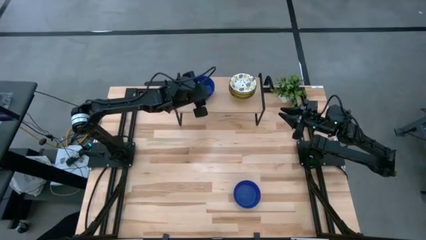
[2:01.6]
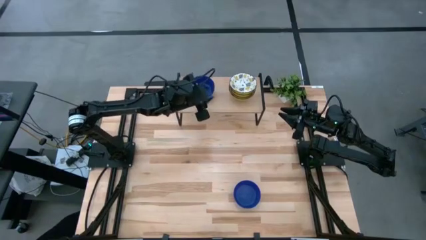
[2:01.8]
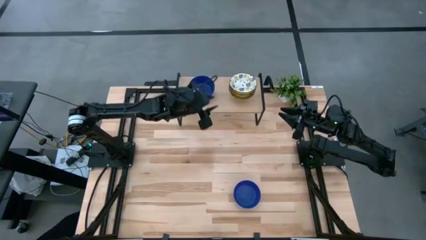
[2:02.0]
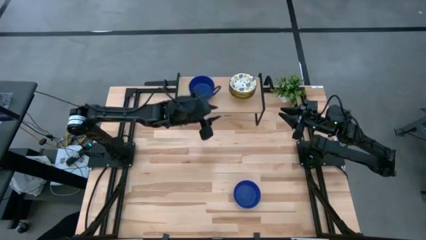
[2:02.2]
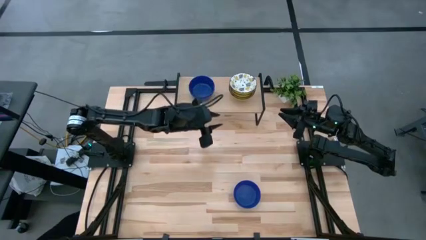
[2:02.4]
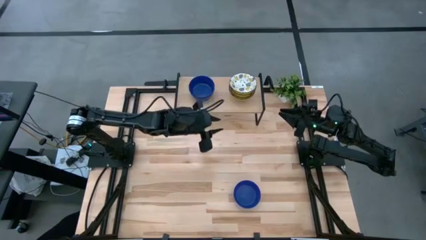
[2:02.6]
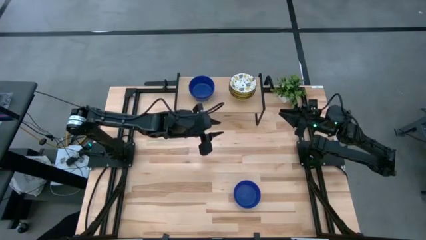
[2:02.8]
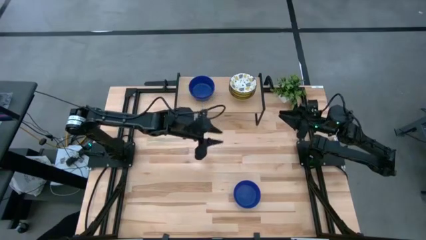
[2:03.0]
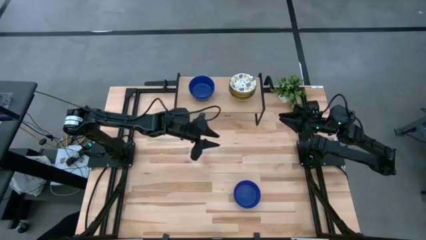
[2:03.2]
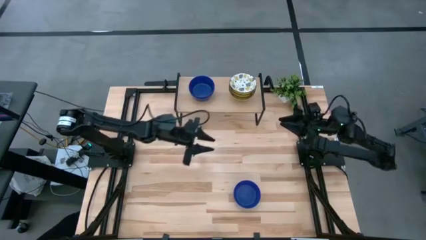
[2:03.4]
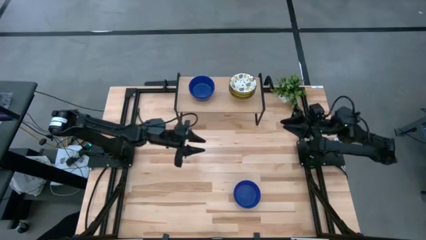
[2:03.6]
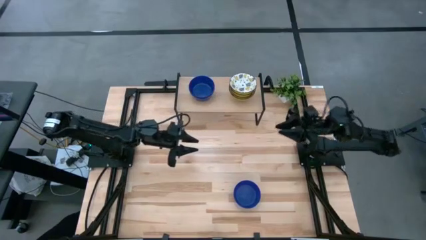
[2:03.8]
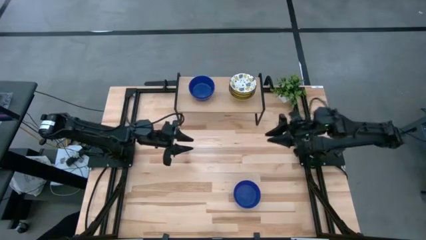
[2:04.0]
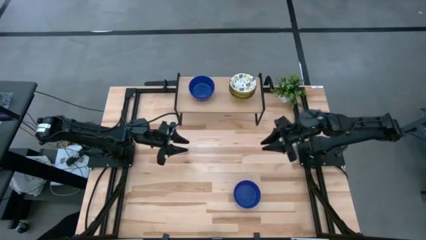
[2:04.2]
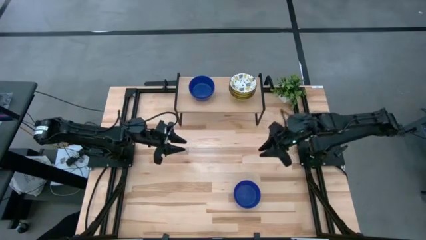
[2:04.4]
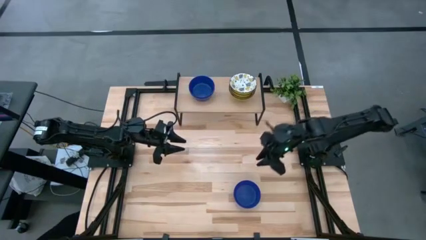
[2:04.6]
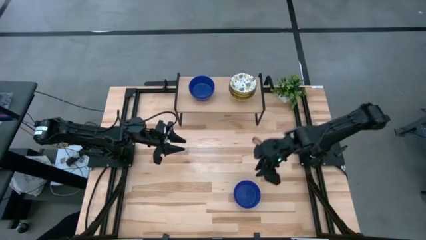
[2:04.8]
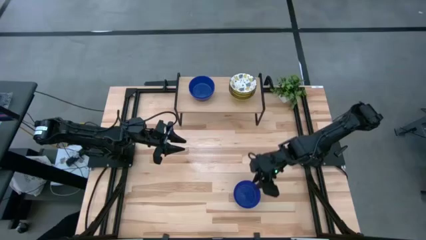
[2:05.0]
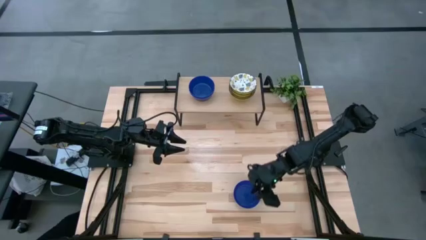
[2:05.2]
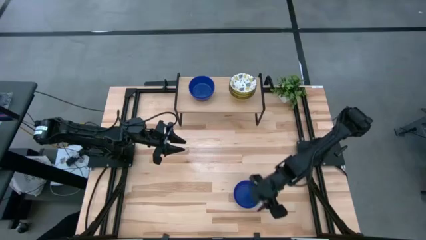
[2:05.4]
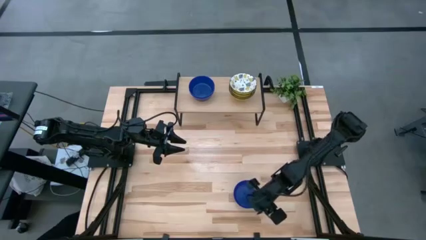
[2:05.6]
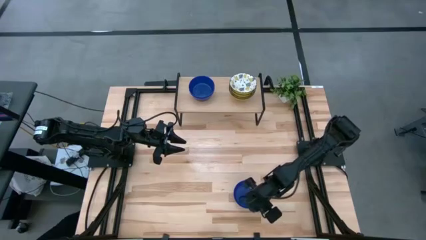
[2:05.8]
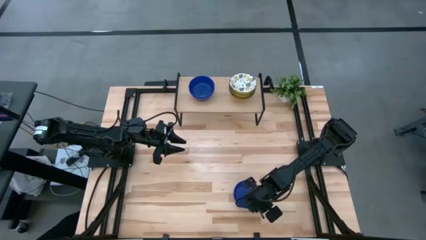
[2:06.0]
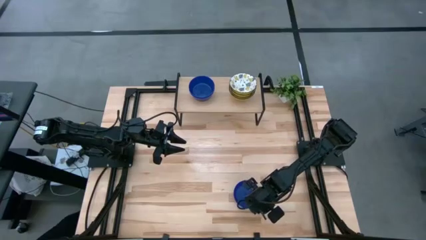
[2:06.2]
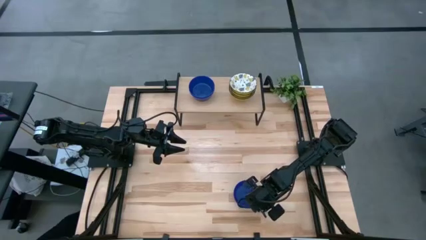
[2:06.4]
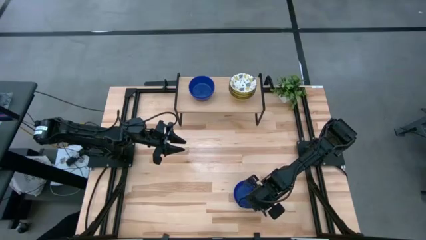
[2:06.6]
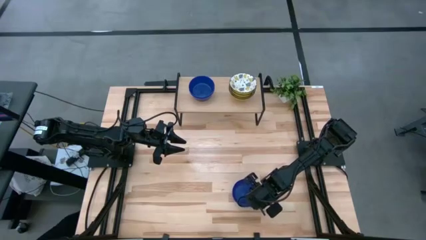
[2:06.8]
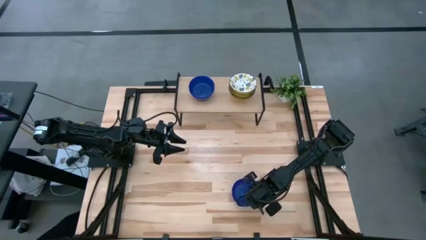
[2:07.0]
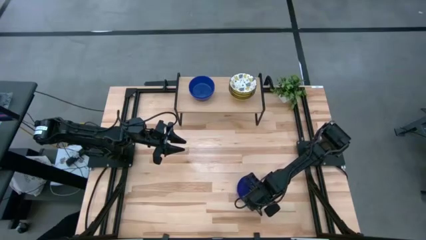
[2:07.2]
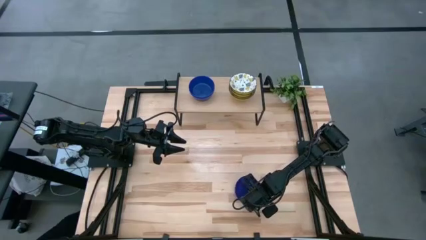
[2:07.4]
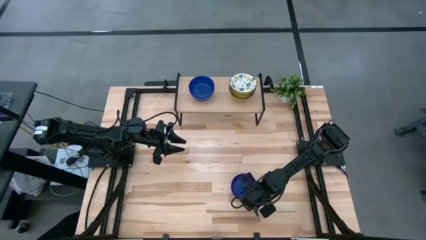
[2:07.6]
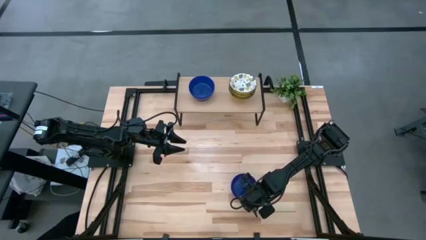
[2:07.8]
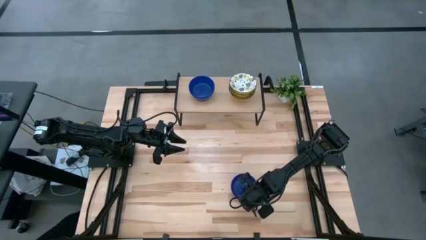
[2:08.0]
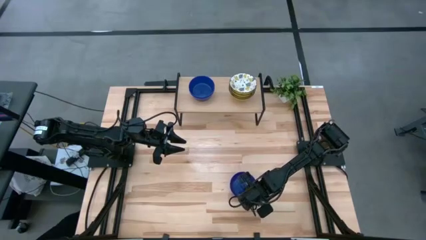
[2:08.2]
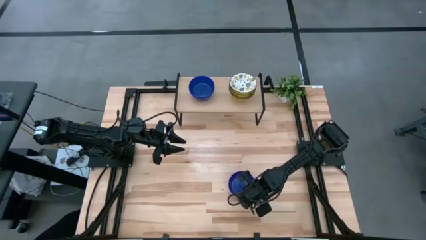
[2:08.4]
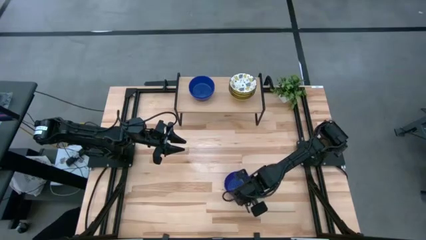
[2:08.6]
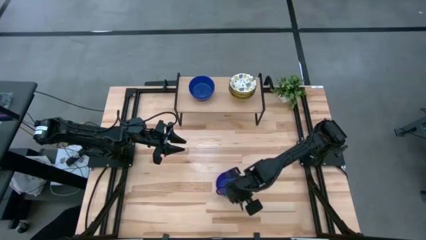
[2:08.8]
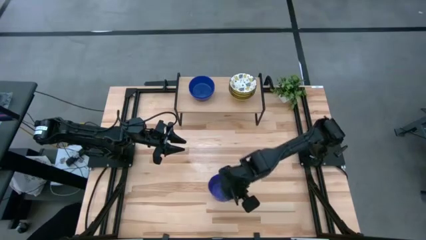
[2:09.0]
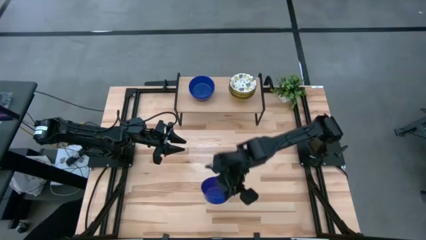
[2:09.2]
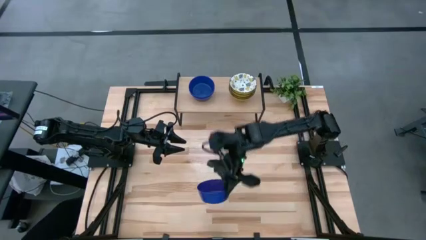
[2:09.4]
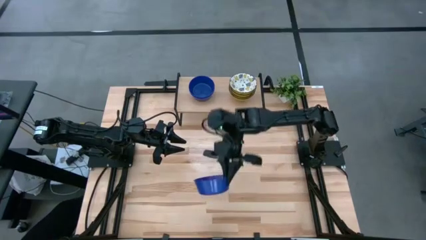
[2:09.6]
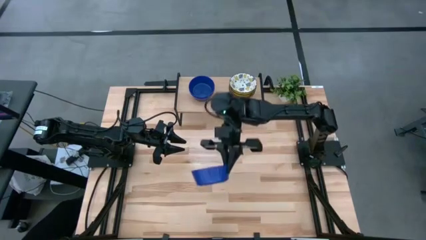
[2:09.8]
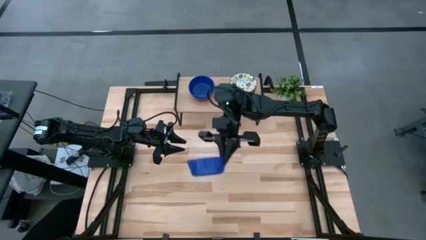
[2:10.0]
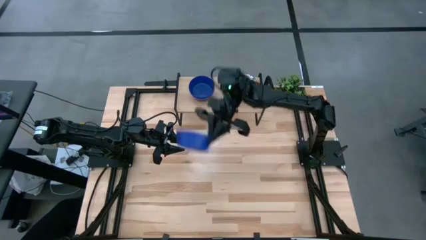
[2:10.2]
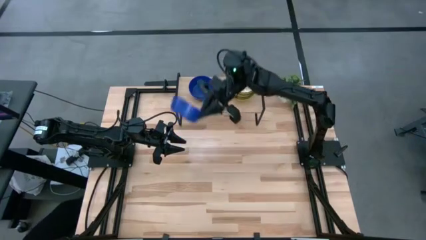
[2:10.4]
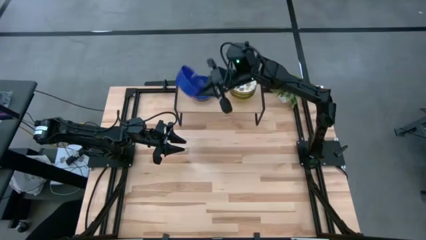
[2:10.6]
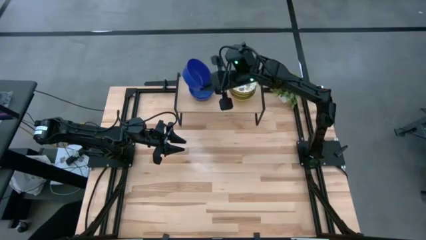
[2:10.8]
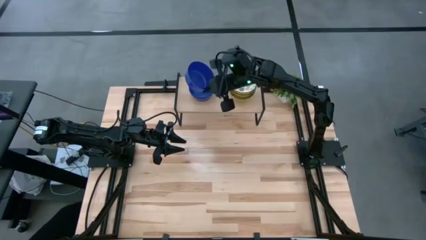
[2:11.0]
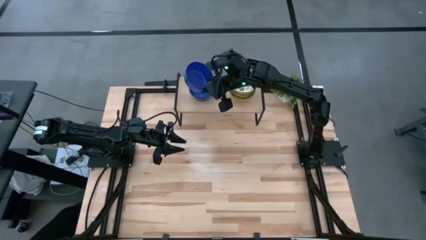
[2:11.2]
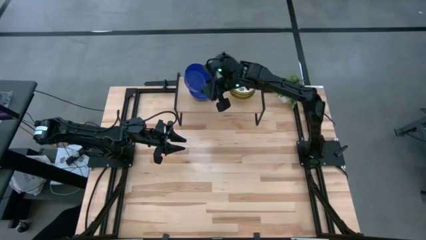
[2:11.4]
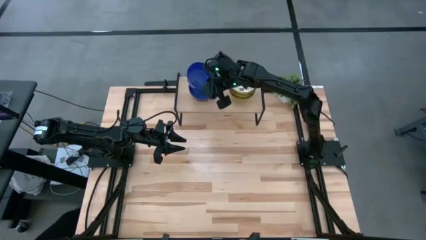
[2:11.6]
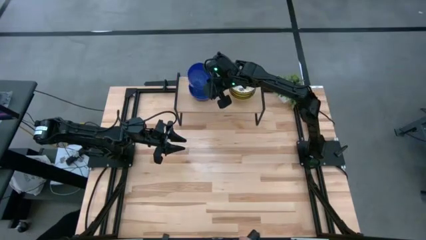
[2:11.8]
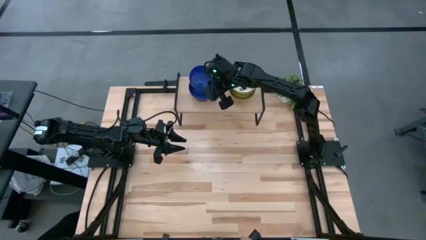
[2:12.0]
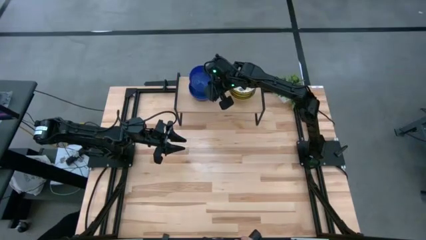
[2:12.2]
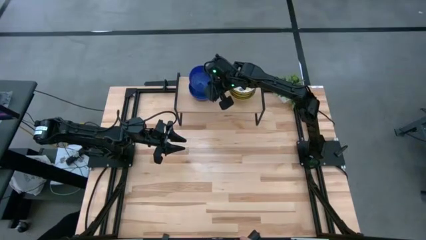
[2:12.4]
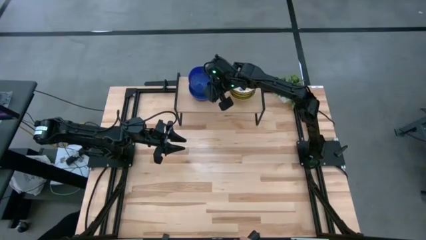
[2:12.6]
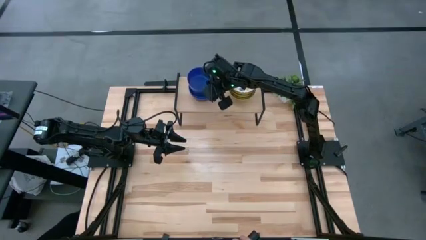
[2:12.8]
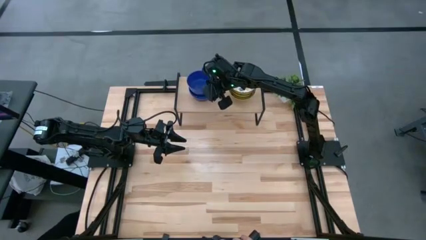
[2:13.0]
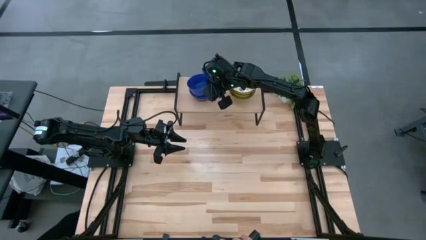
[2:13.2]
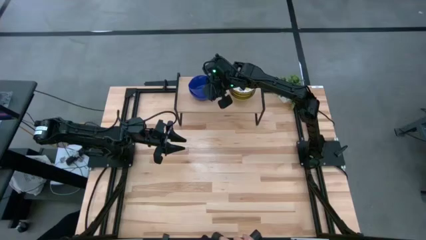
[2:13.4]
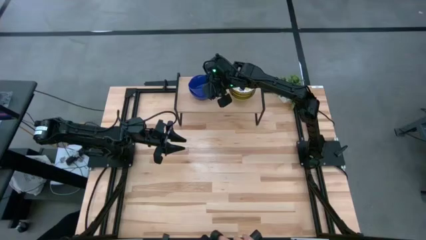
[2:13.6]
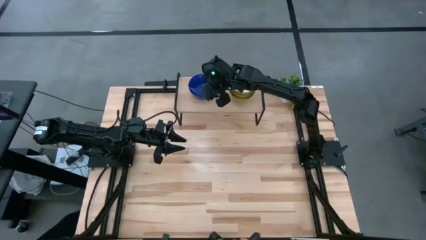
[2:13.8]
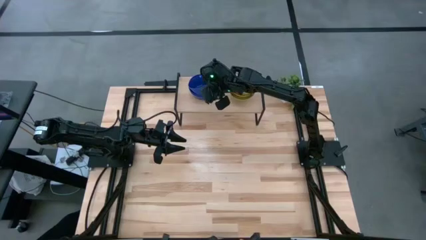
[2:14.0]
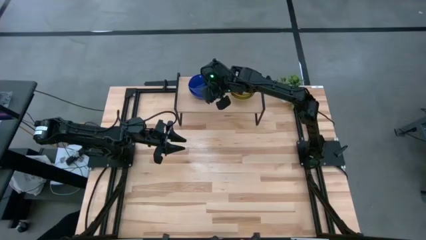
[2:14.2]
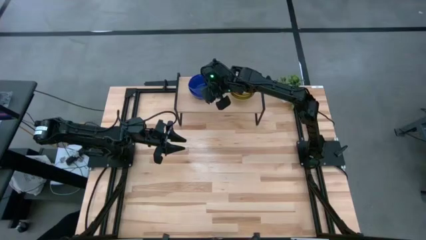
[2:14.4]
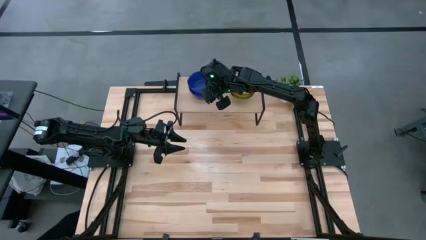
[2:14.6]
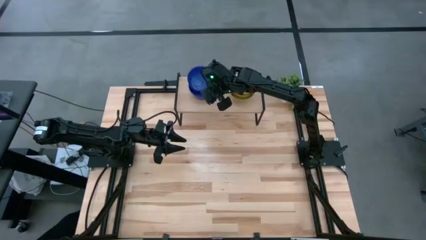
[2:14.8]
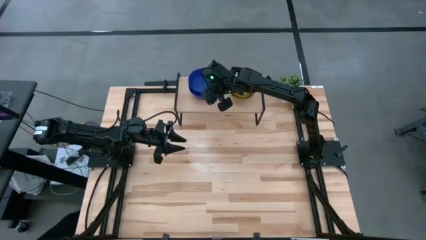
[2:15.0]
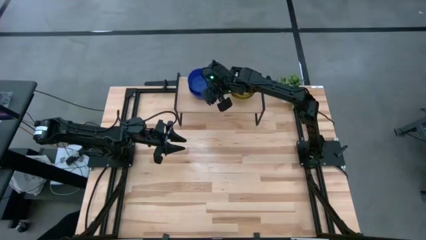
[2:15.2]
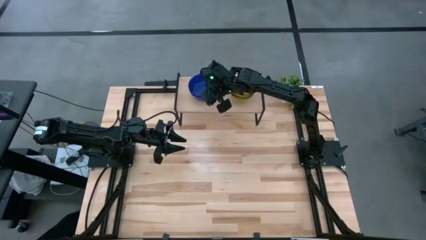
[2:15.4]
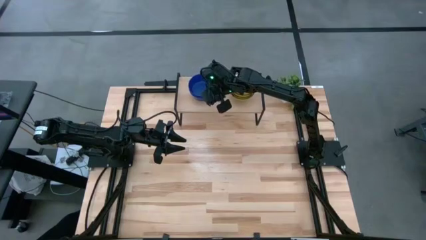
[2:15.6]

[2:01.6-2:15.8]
Task: Pick & Place Mini bowls
Stack the blue bowl on top of the blue bowl on the shelf

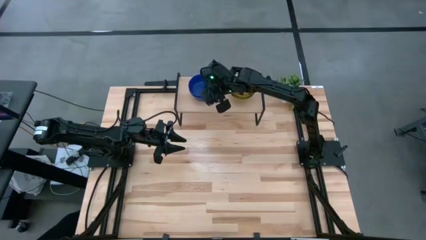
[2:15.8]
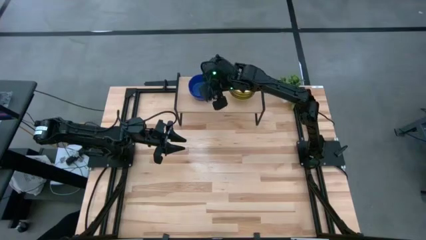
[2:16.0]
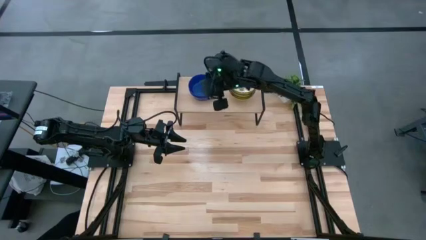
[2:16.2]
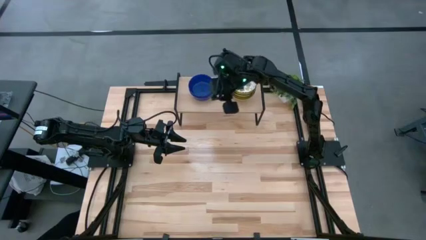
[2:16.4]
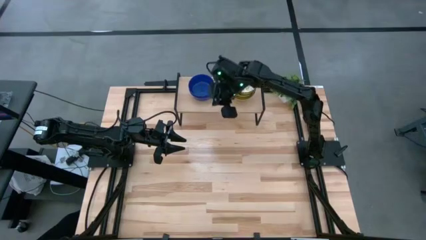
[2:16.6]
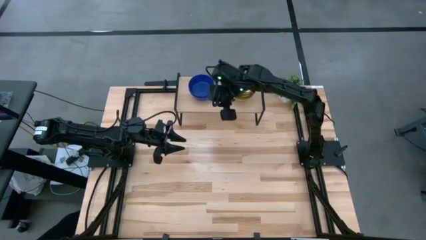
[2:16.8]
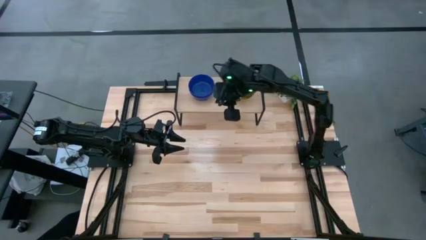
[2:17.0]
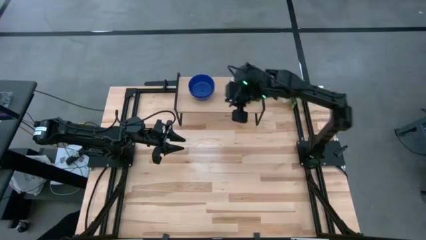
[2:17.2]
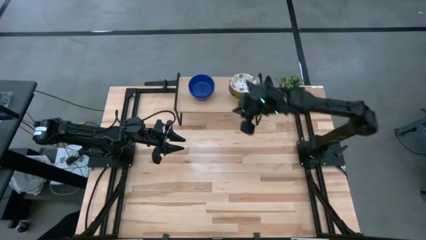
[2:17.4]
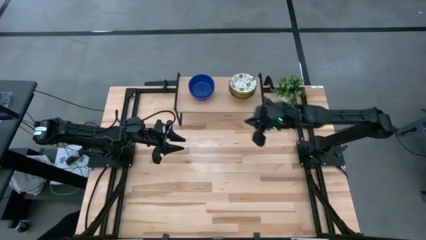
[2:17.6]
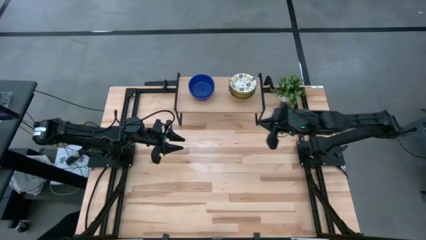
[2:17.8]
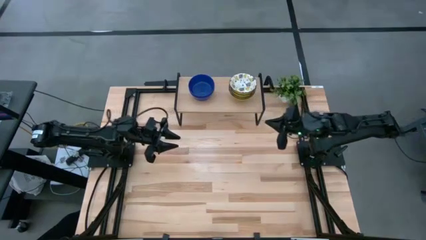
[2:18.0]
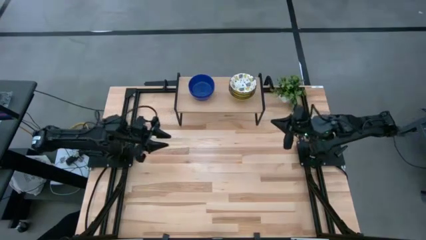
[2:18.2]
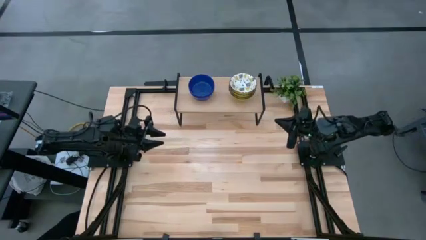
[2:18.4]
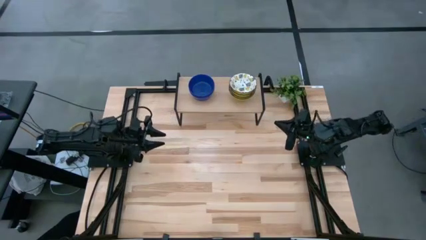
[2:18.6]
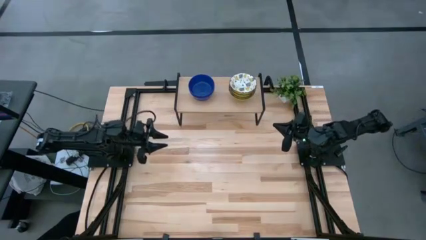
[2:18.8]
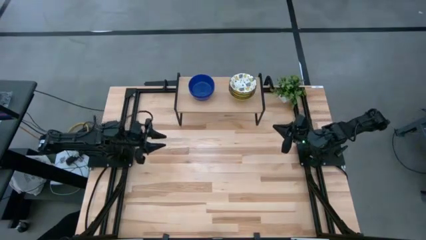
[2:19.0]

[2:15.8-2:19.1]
Return to Home Position
